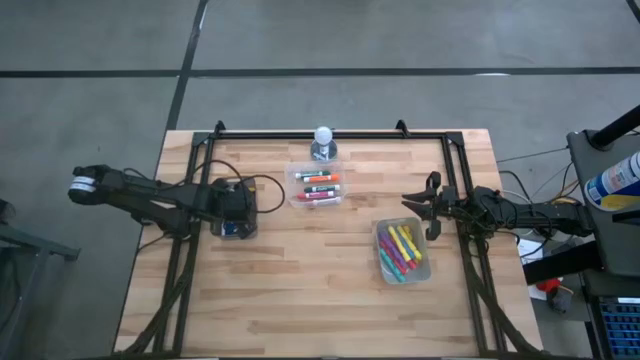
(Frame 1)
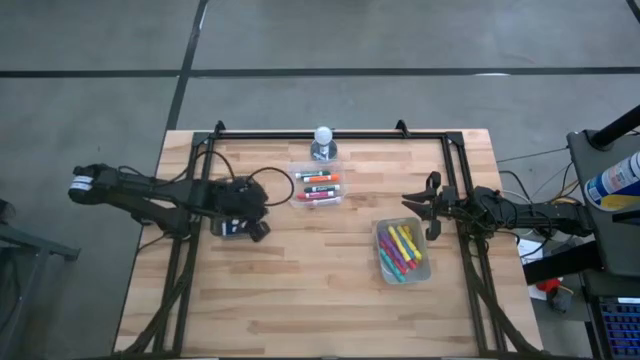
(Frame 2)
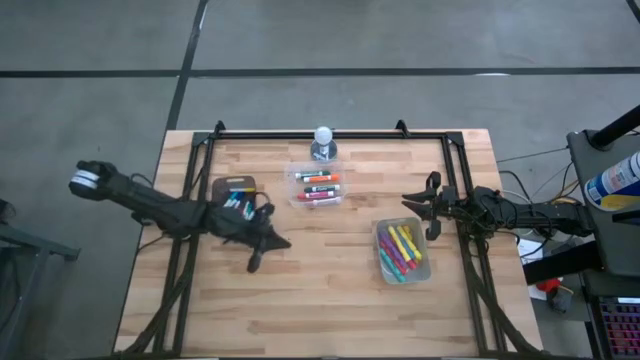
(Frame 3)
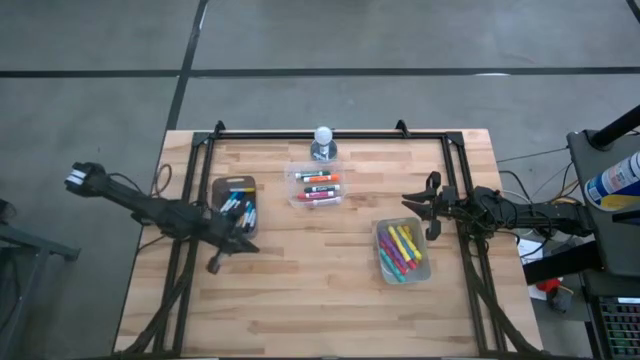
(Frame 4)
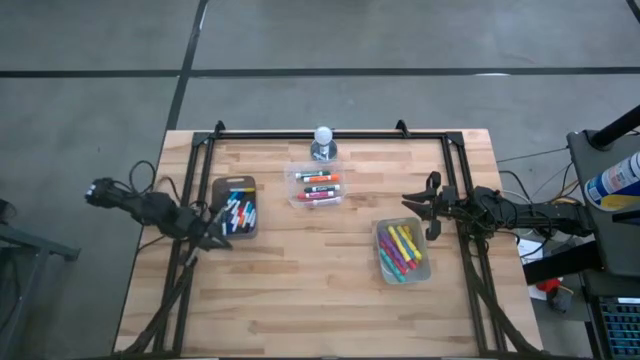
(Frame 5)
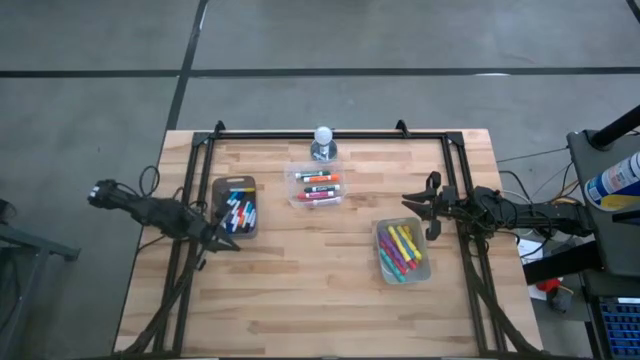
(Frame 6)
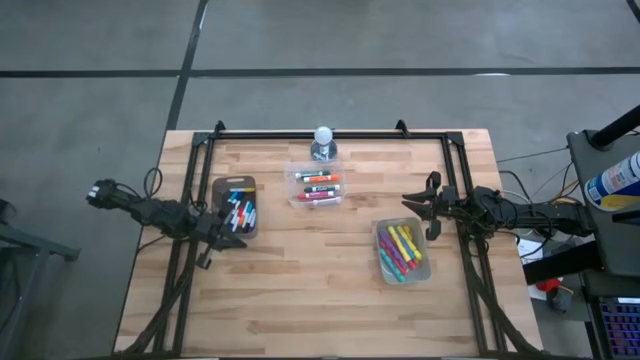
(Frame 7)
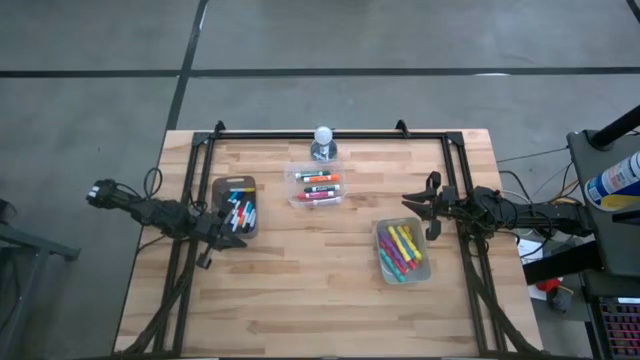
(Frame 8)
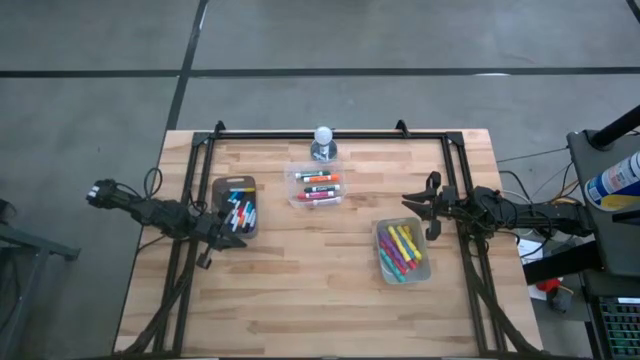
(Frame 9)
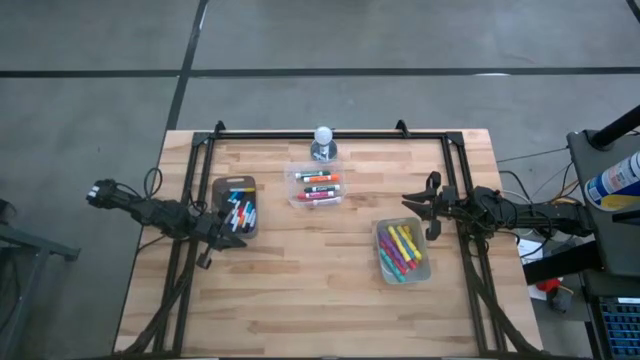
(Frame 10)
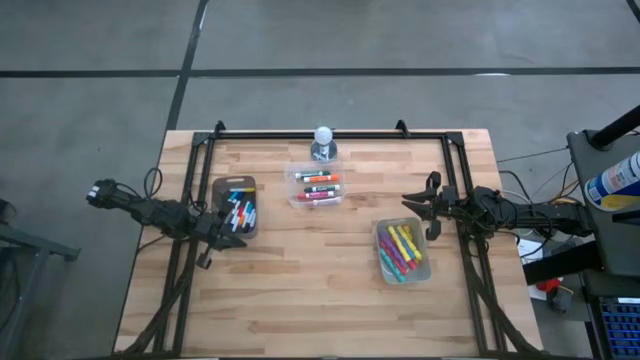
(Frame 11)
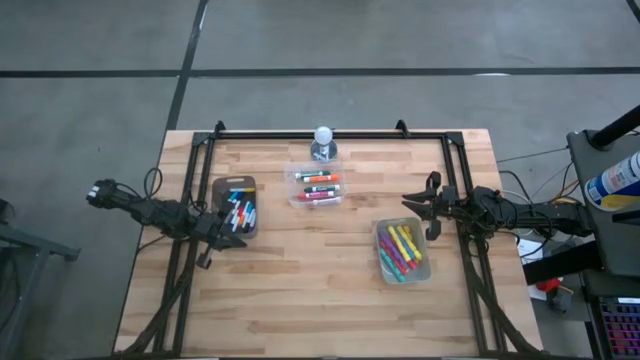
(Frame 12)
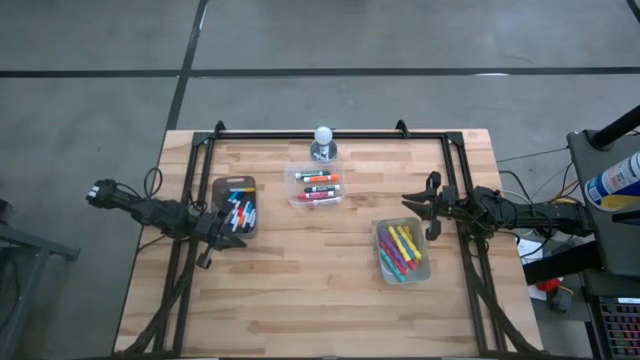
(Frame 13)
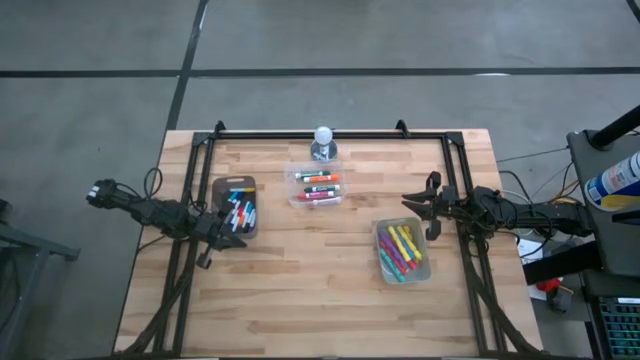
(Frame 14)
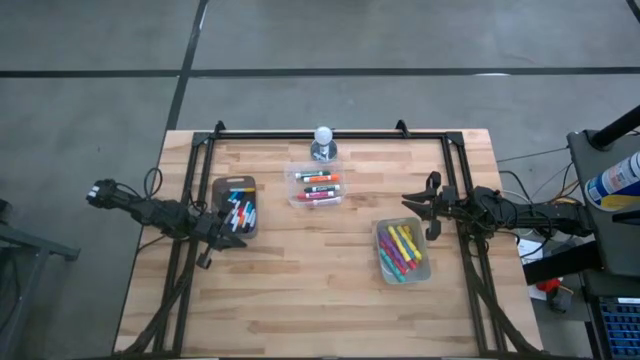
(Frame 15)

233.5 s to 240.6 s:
Task: Pick & Place Markers
Return to Home Position

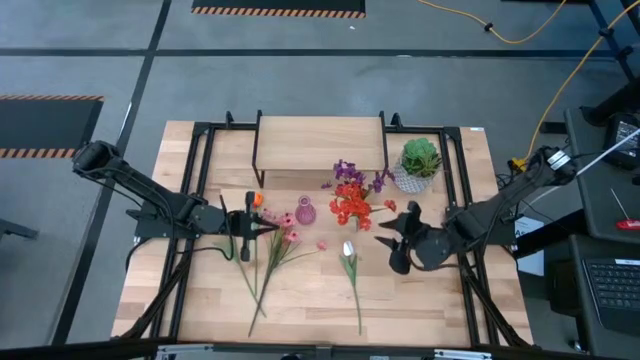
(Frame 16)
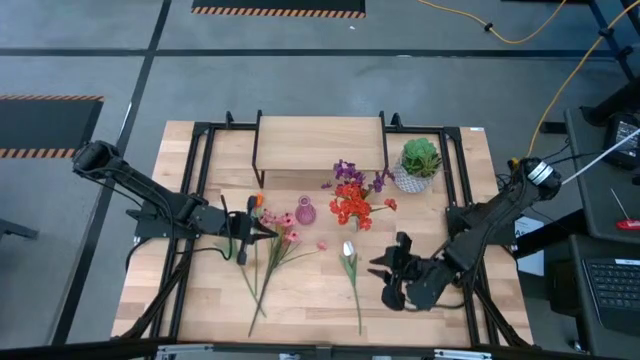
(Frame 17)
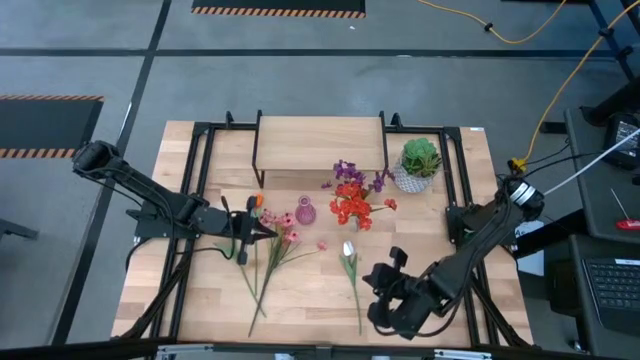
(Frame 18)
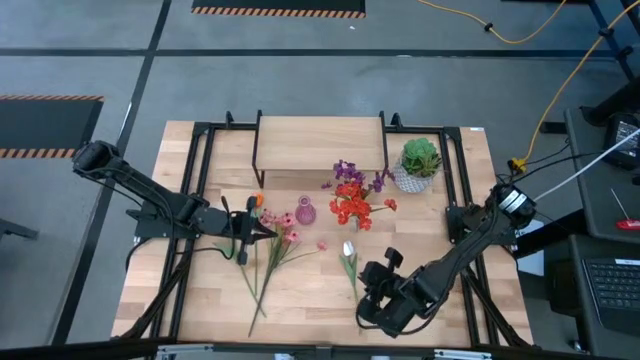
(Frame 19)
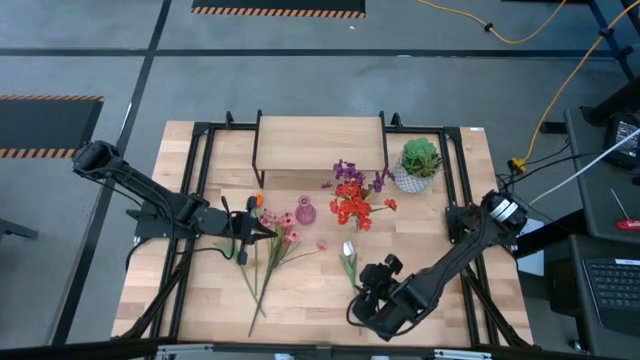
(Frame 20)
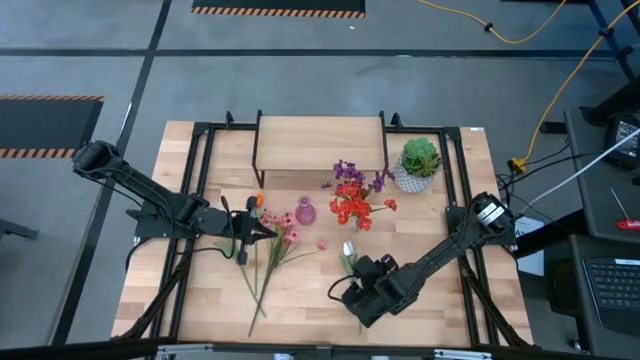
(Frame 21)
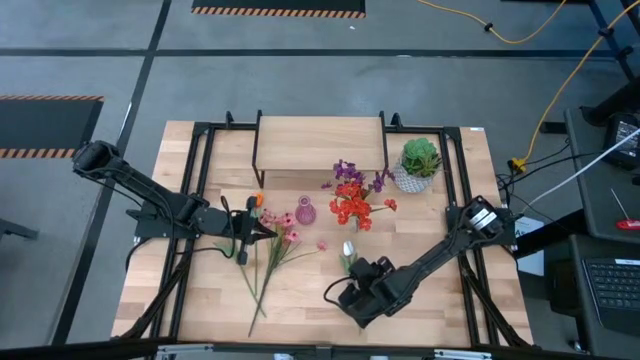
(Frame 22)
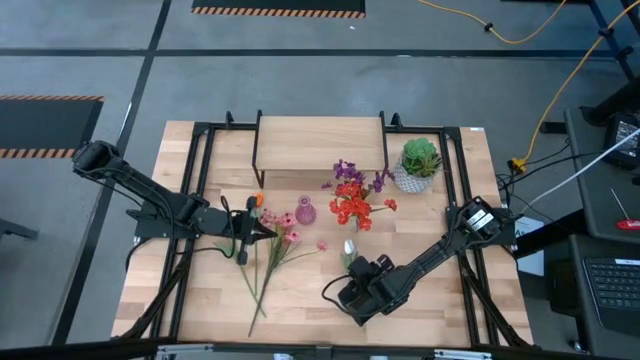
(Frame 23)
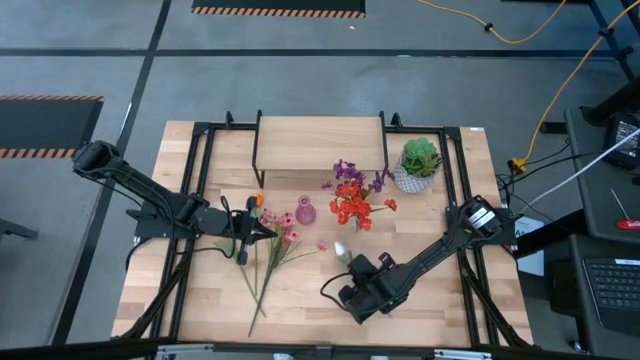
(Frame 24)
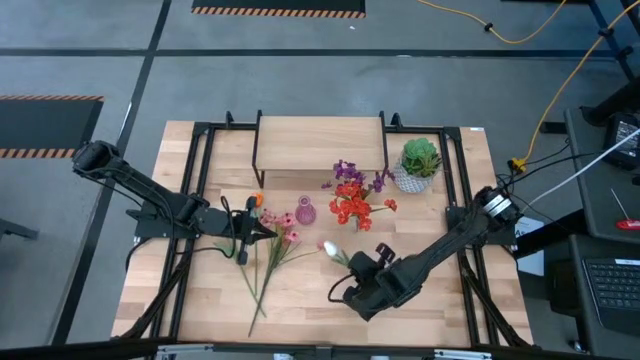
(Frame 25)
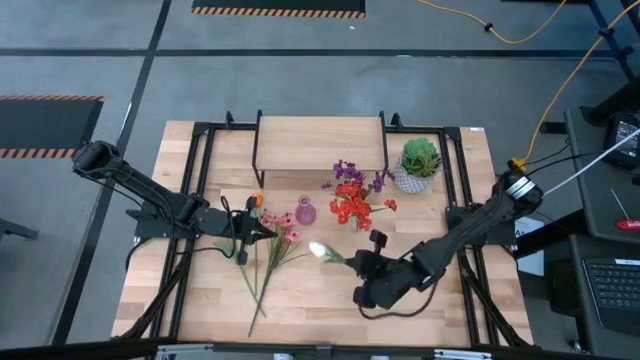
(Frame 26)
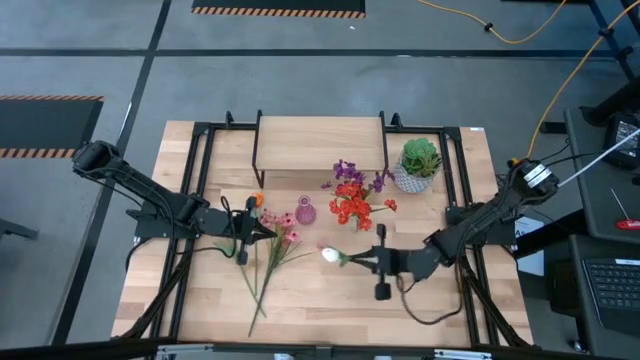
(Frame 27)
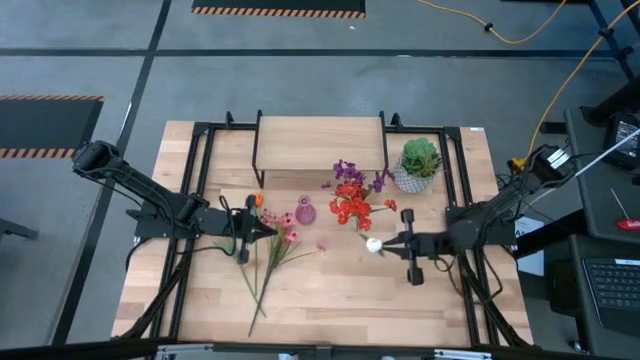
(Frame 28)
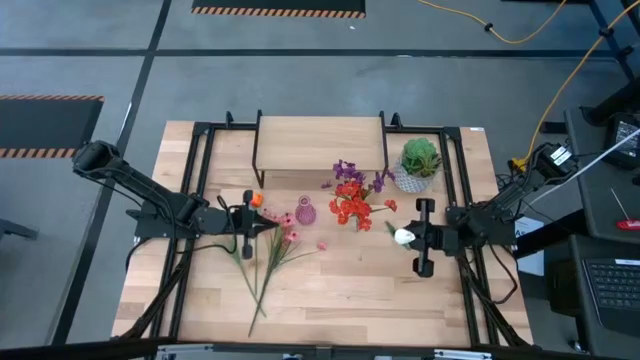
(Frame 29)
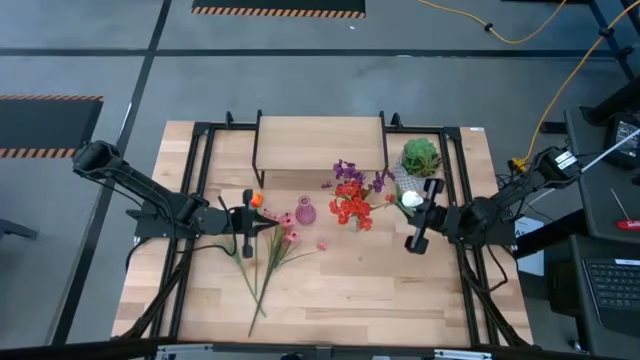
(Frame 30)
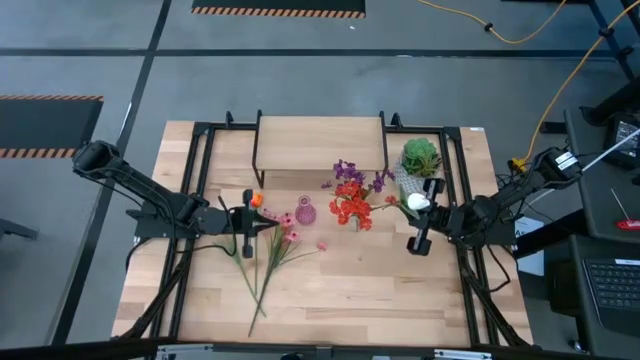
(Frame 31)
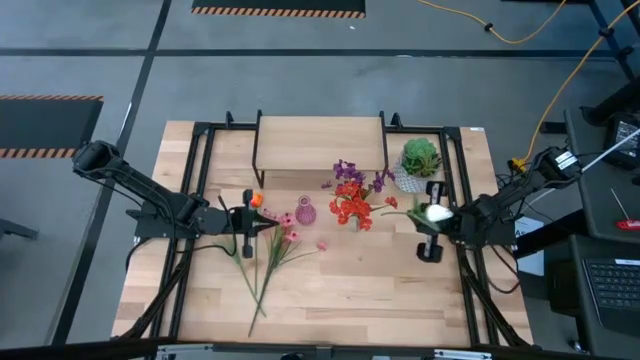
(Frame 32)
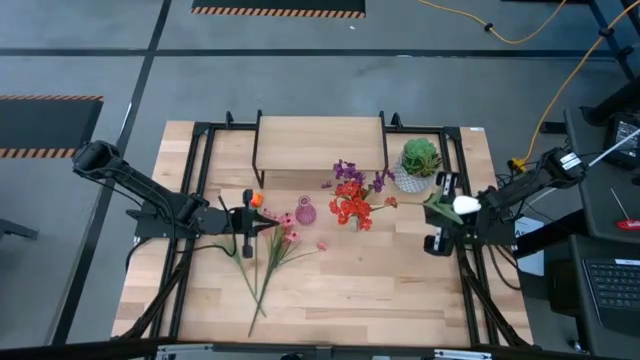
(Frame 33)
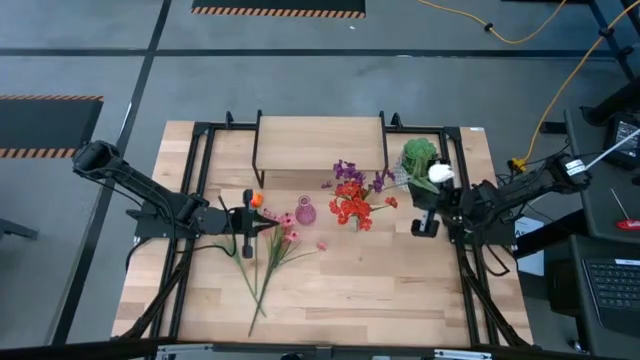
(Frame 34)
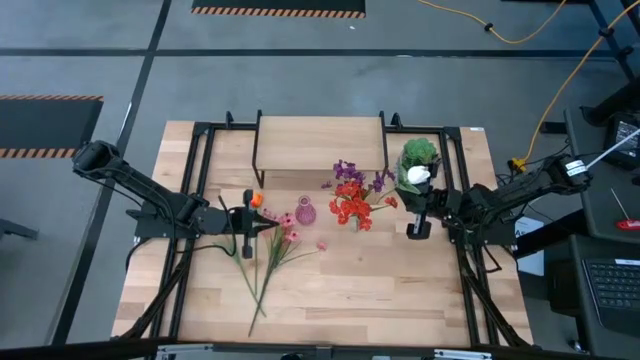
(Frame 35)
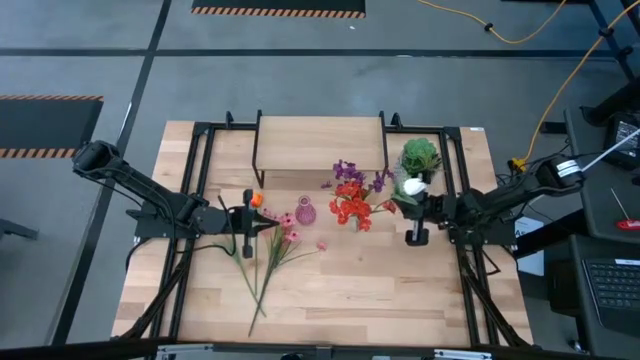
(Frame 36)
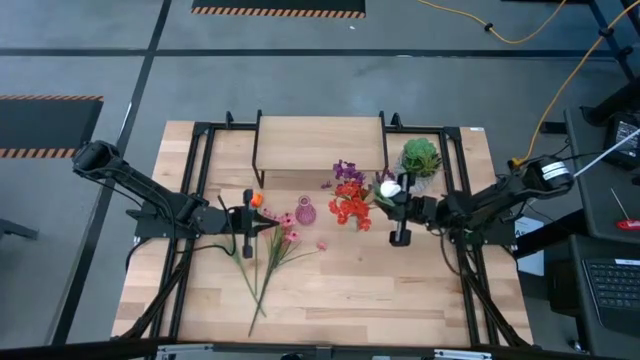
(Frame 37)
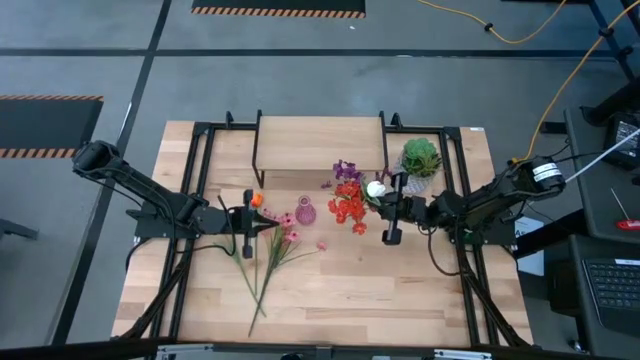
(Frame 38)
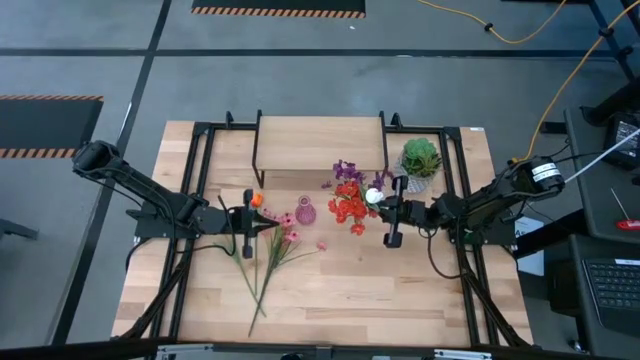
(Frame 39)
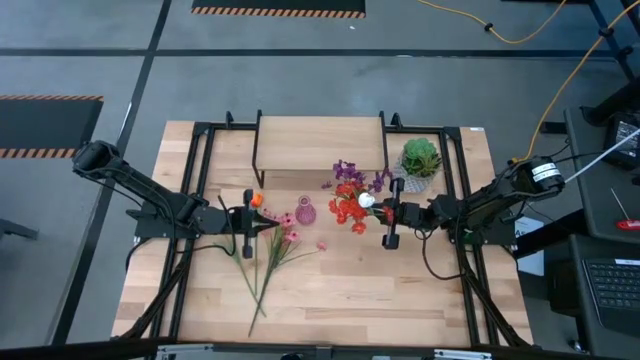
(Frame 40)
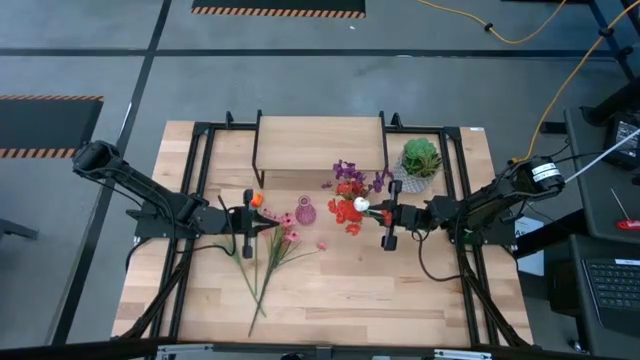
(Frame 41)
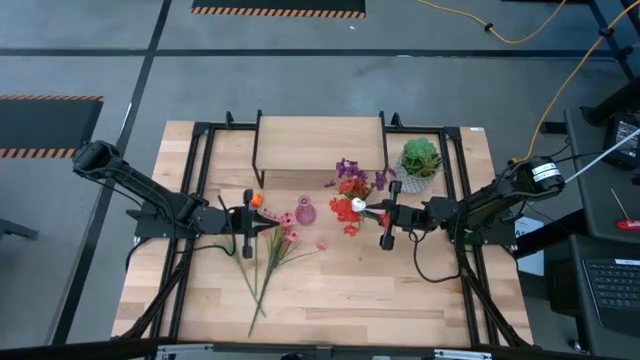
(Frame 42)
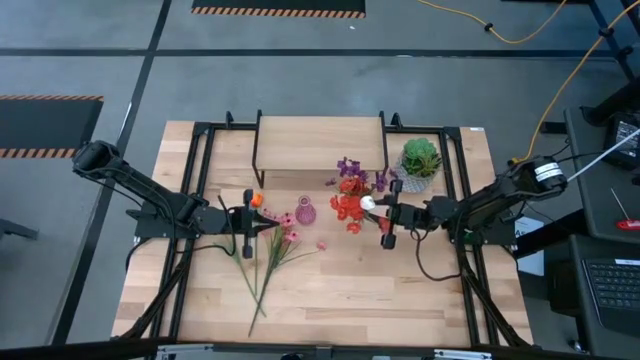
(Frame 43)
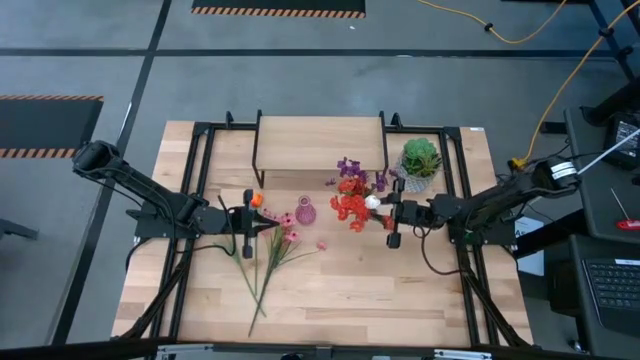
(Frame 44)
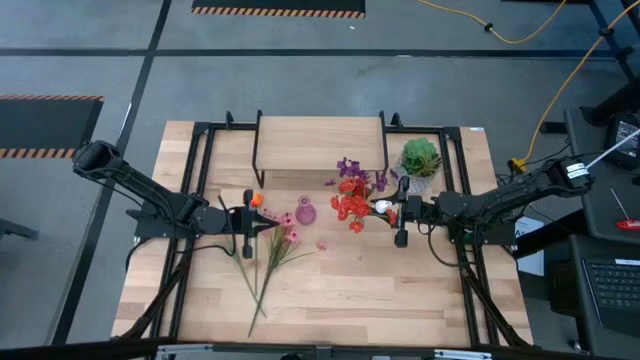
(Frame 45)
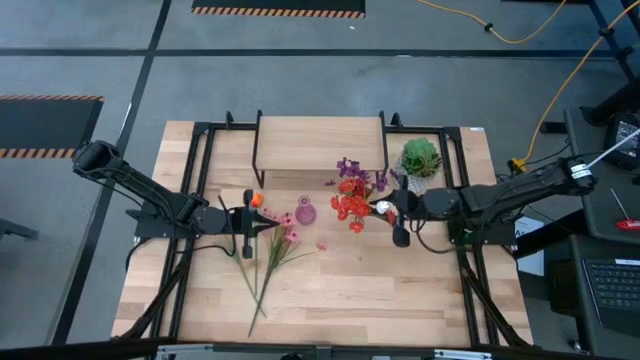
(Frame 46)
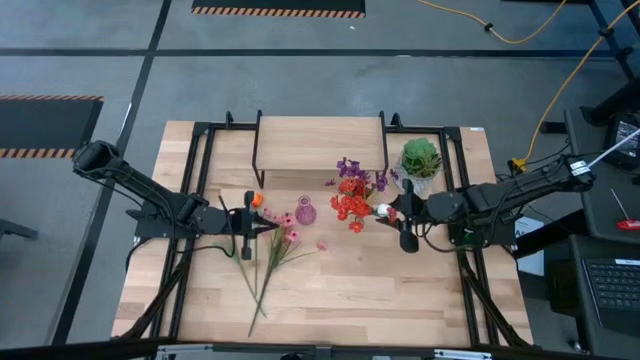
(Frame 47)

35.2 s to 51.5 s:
Task: Pick and place flowers into a vace then onto a shelf
Put the white flower into the transparent vase
